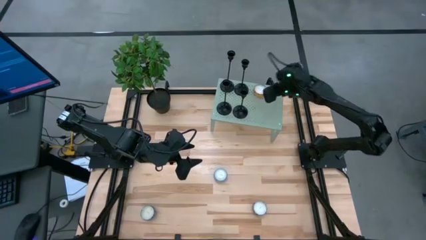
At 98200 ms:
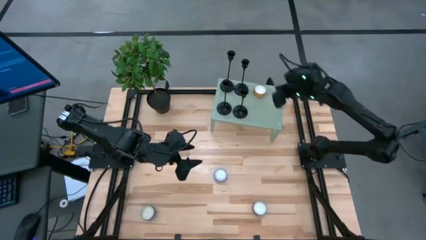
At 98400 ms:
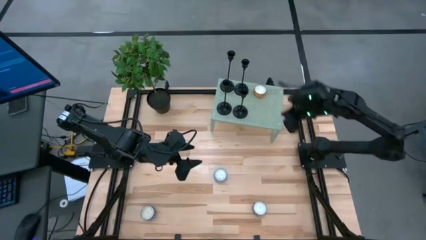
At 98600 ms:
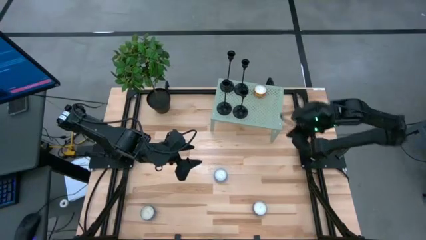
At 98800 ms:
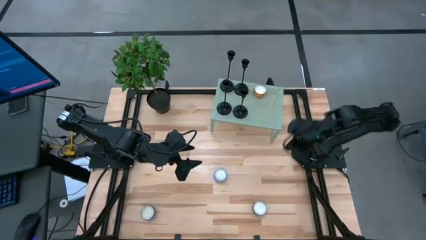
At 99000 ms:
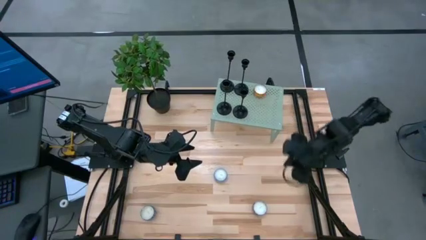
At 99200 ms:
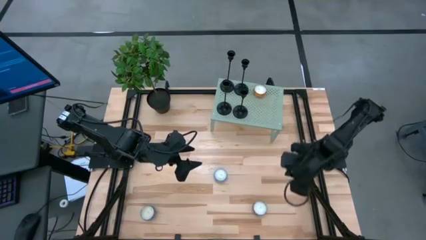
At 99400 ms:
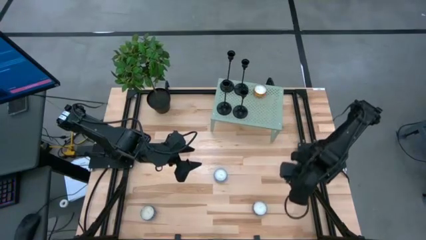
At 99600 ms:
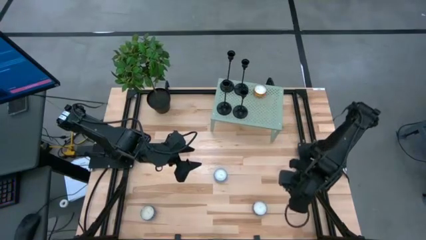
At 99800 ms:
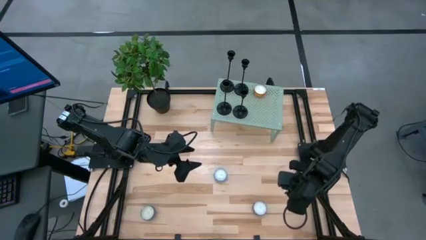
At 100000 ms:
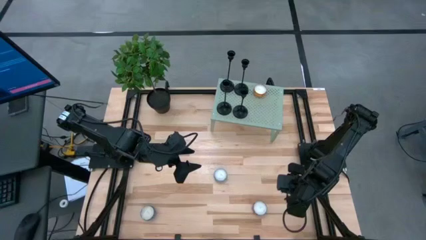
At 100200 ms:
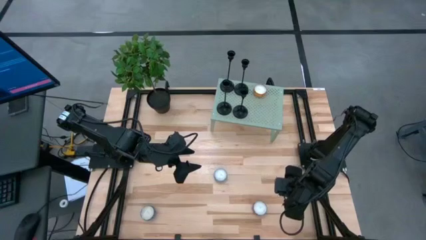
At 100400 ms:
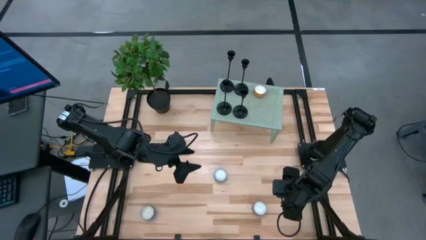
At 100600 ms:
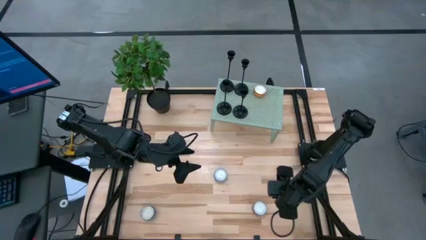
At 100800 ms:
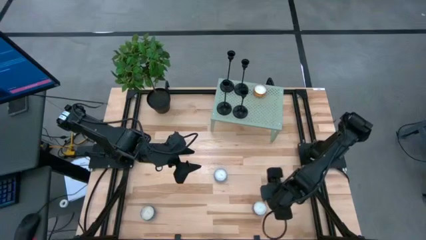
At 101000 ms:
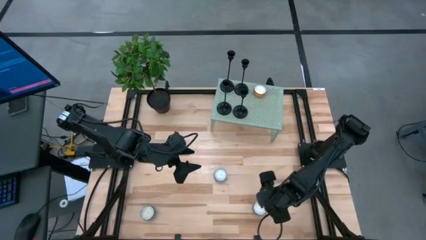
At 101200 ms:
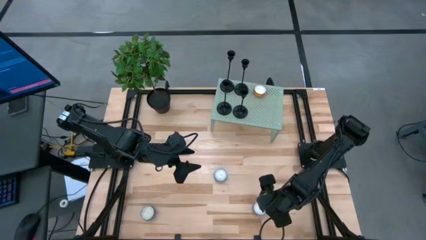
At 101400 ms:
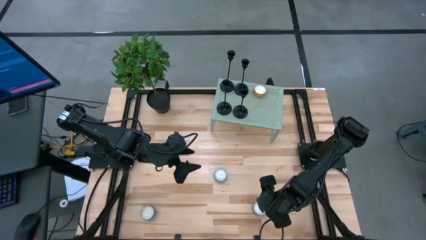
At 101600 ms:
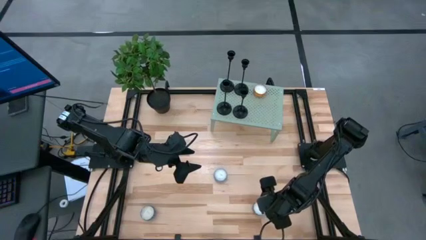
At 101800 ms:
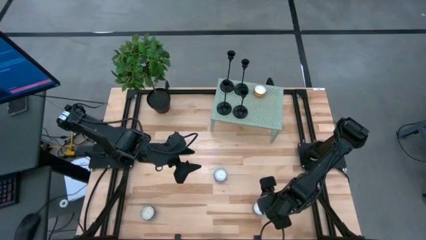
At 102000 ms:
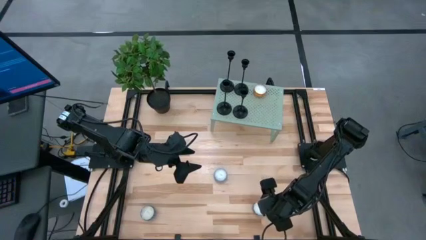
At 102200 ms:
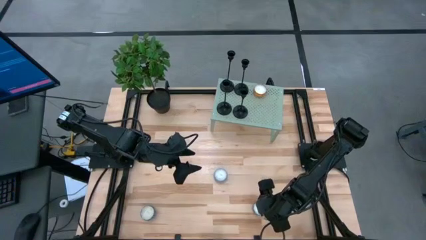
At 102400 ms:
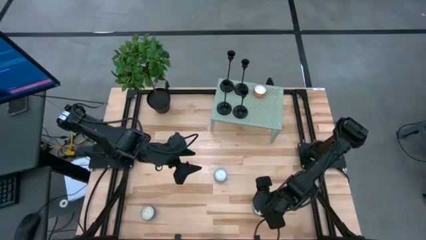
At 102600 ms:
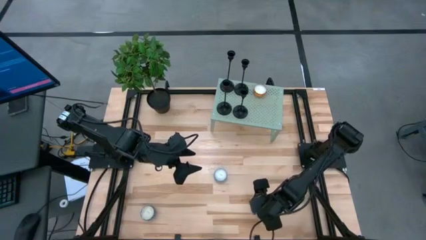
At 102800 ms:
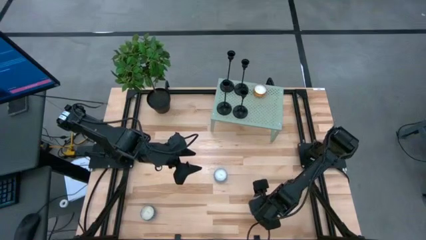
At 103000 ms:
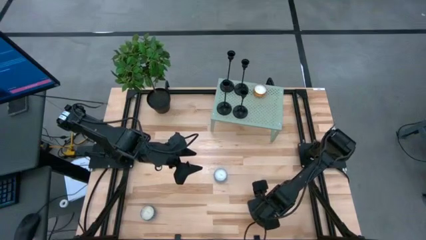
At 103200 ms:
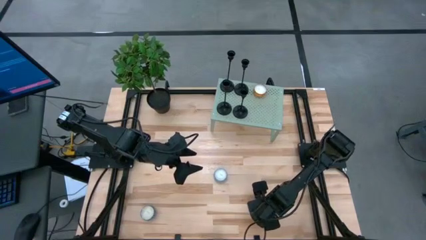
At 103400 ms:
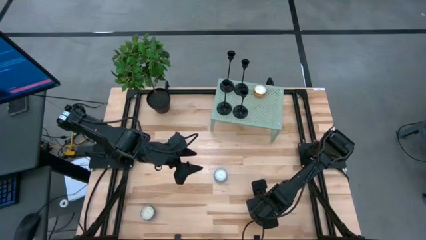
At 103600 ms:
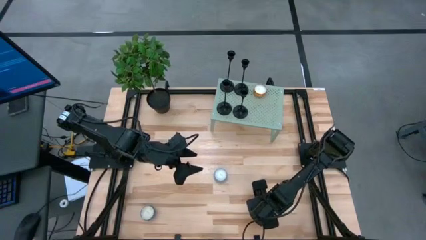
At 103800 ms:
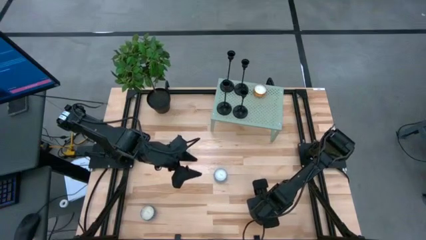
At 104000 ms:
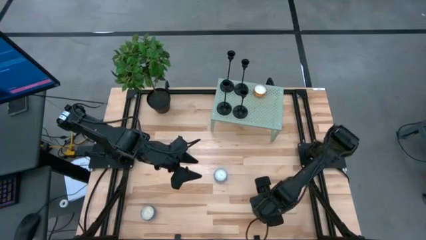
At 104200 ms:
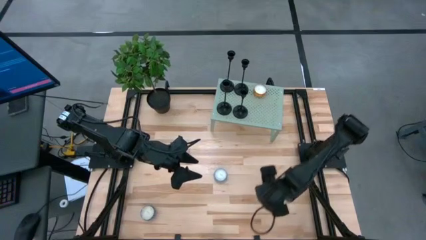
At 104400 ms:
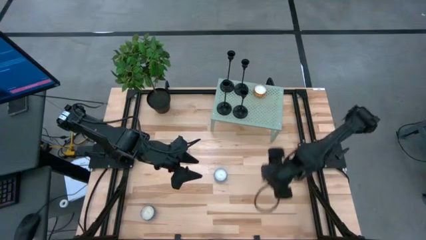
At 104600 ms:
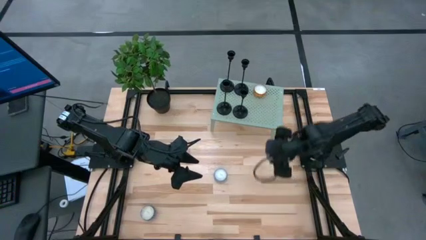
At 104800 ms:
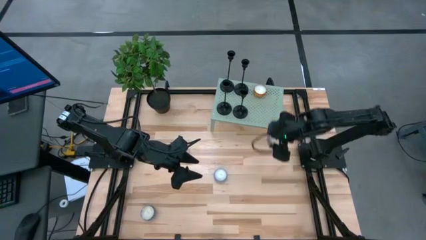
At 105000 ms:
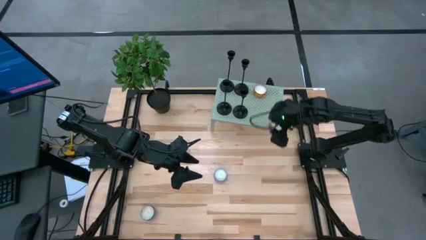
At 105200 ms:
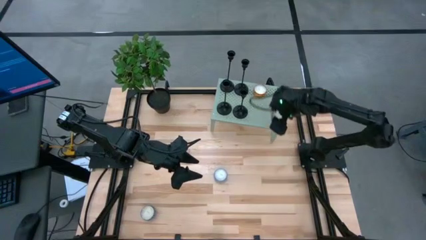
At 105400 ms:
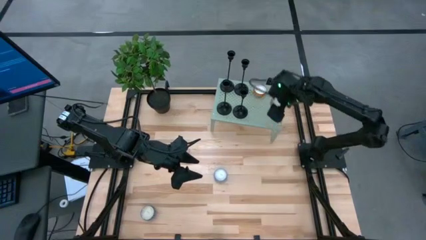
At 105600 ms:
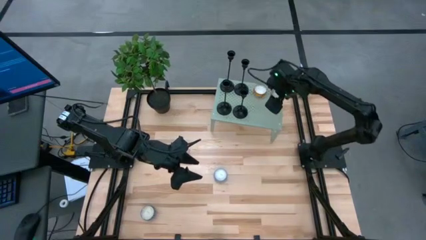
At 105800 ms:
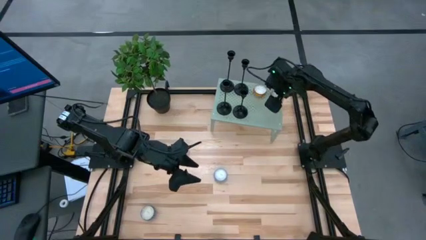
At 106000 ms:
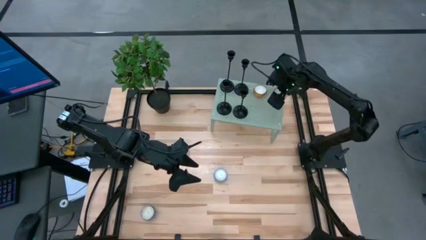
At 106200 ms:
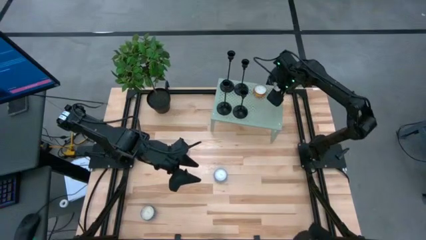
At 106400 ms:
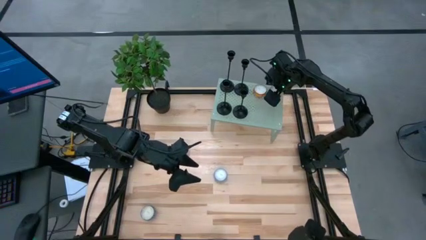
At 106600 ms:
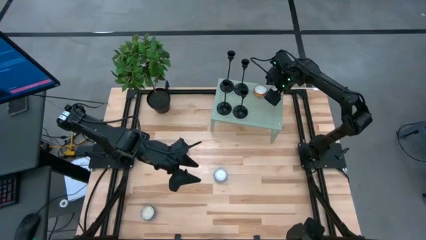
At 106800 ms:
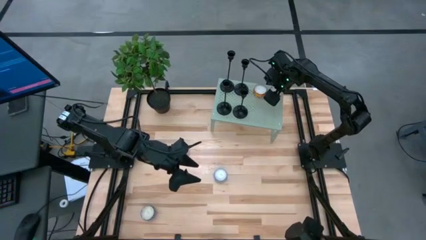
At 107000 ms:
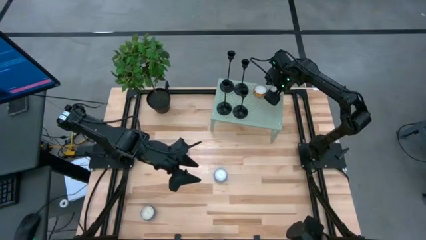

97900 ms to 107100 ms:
Task: Pick & Place candle stick holders
Put the red scented candle on the shelf

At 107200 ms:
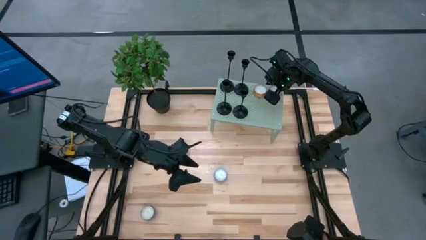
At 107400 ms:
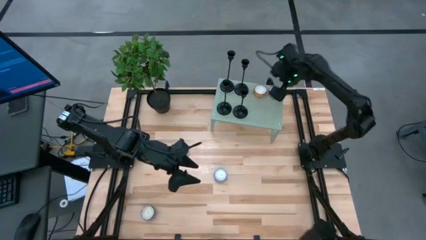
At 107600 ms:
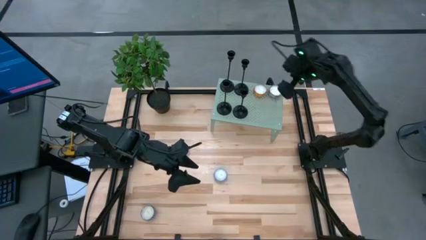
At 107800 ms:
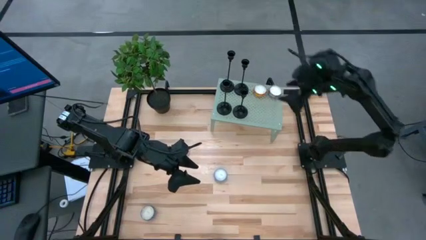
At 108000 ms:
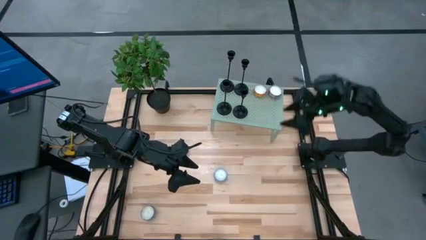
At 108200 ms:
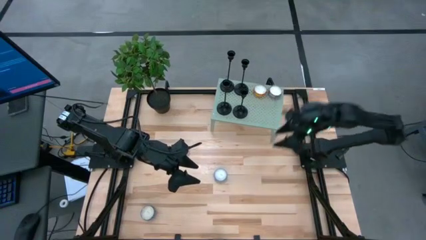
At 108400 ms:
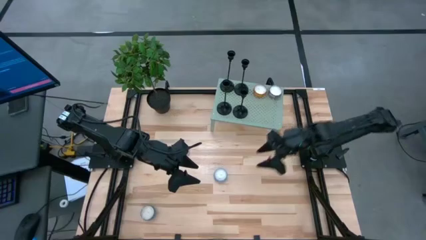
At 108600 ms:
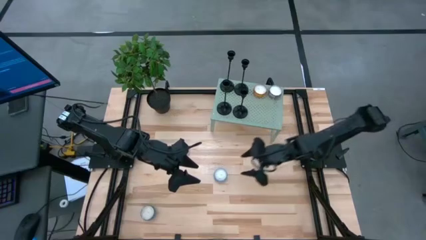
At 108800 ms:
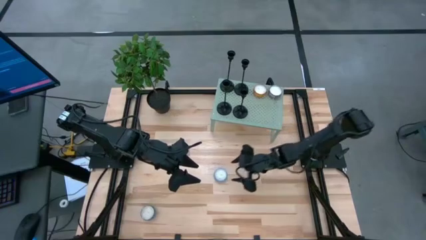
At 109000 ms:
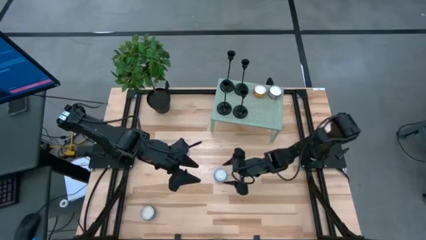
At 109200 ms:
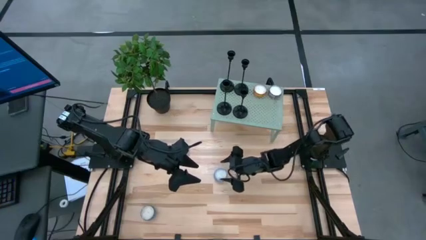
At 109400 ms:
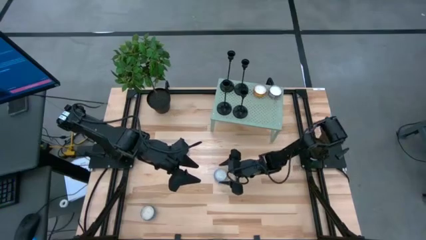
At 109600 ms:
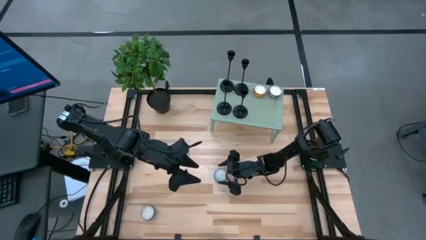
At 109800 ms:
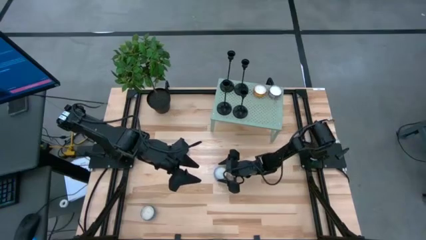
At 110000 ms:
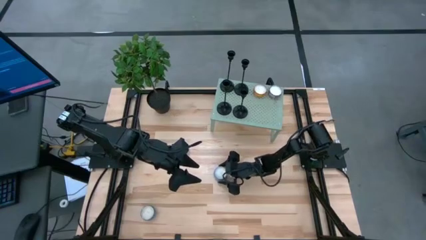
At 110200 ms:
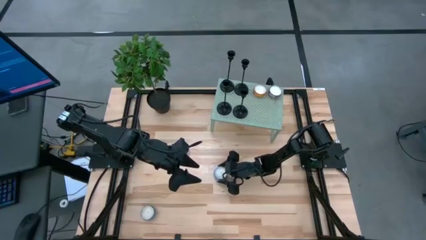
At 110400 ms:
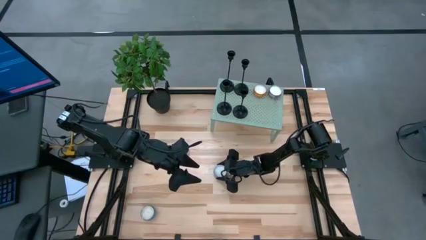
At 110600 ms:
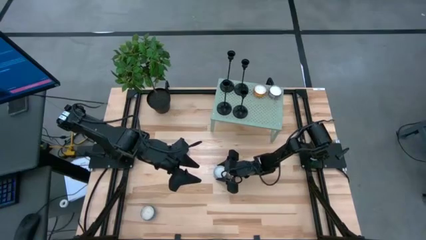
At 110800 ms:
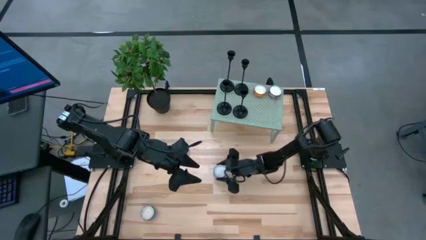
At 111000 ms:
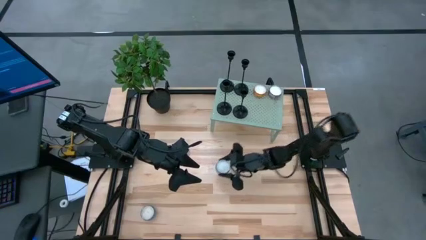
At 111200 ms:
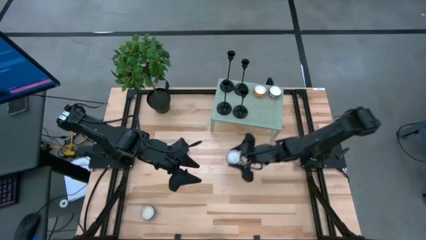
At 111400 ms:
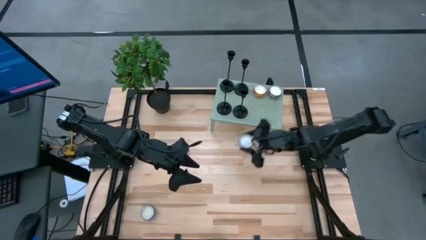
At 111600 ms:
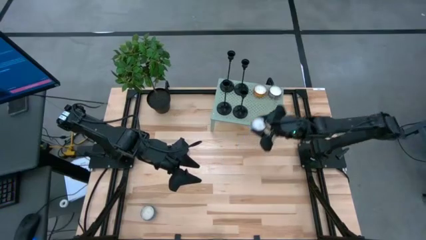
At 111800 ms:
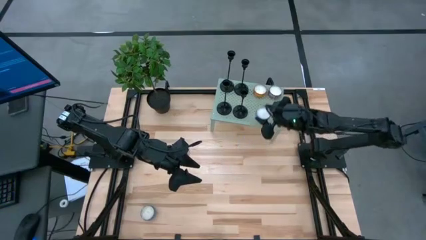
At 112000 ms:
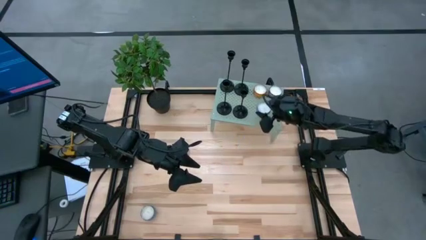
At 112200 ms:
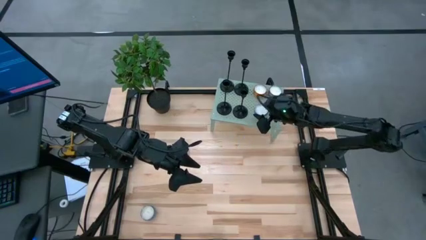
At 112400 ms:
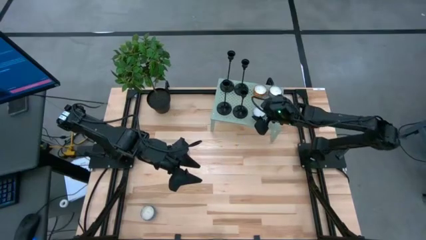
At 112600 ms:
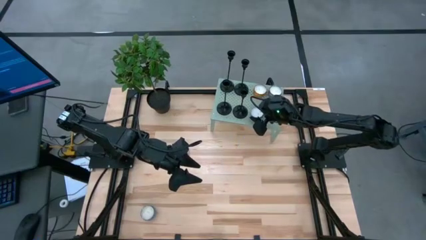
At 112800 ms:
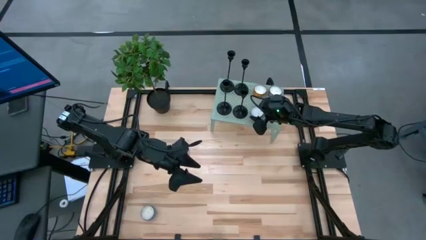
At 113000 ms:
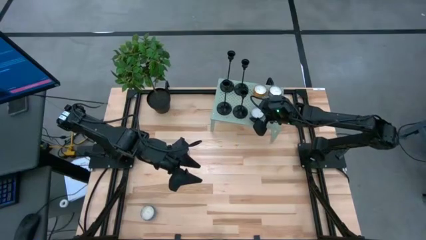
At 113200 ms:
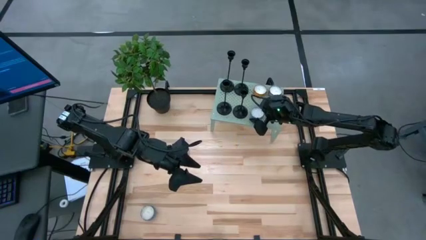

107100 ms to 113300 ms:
Put the blue scented candle on the shelf

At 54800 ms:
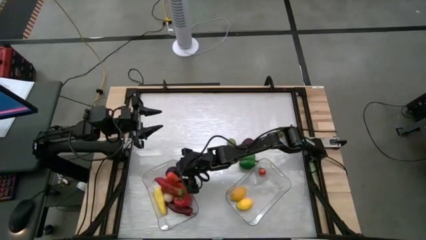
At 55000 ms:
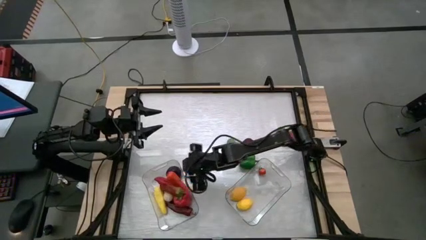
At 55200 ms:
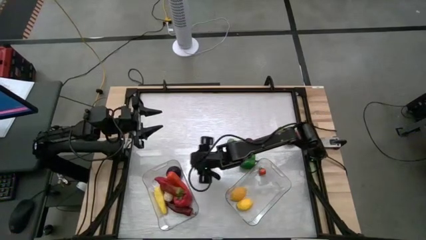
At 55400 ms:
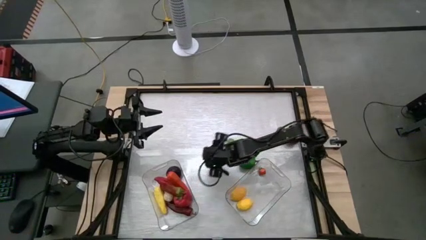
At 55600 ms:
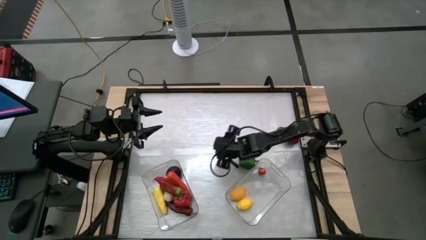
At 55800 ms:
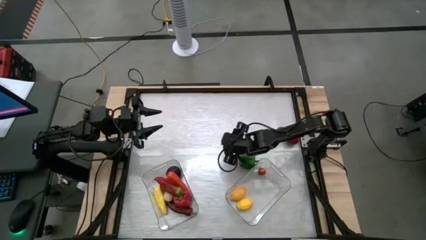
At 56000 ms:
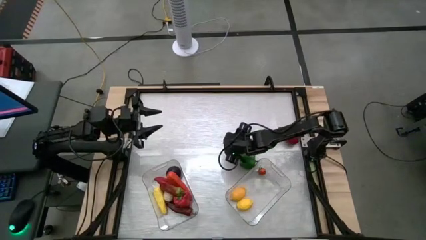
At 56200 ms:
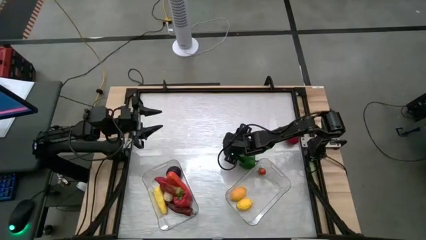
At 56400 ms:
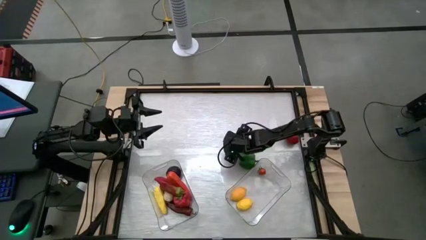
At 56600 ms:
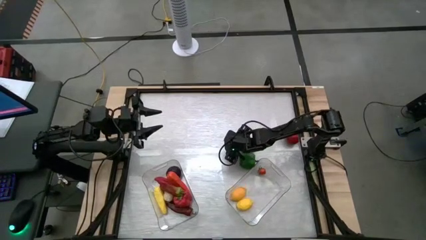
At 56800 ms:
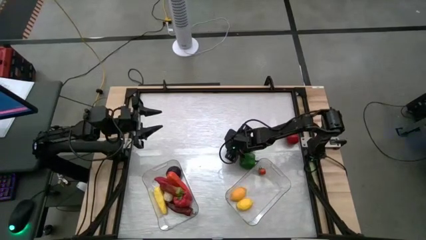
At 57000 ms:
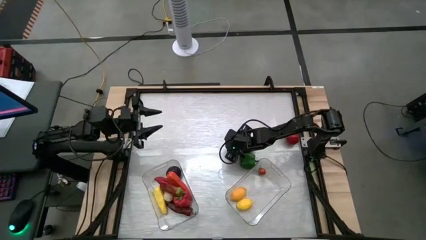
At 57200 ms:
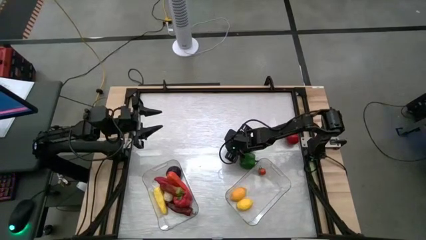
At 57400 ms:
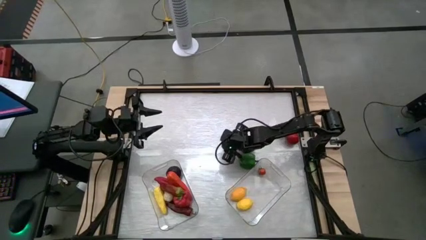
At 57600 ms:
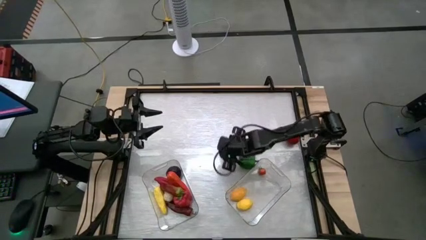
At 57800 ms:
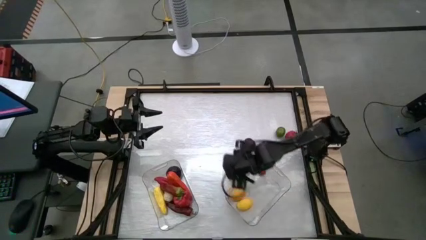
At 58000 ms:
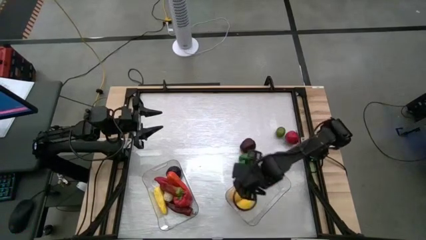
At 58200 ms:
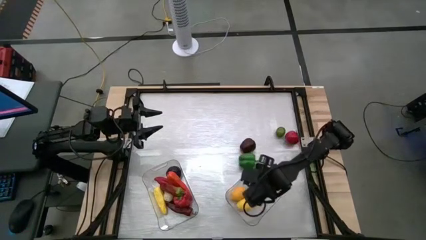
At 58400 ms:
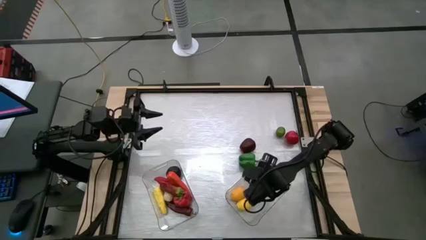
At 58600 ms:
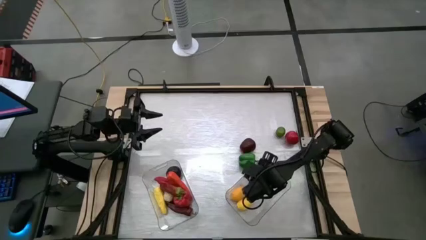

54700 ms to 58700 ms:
Task: Sort produce into baskets
Put the lime into the right transparent bin
